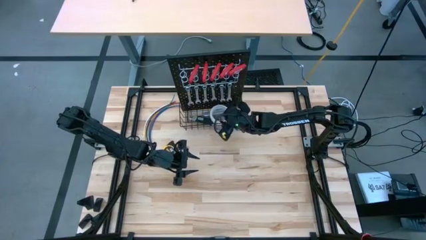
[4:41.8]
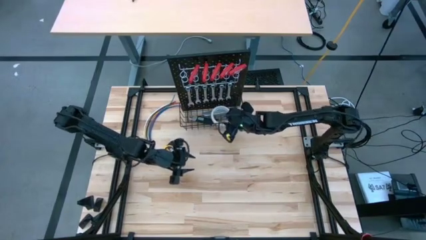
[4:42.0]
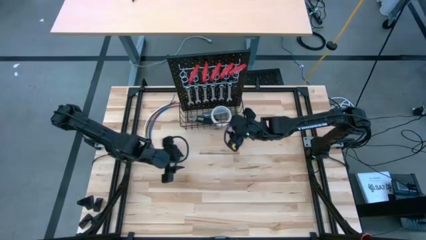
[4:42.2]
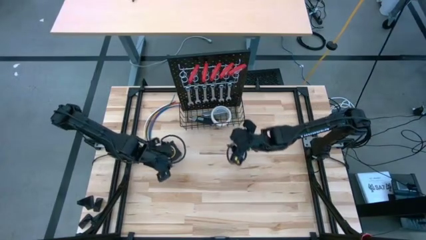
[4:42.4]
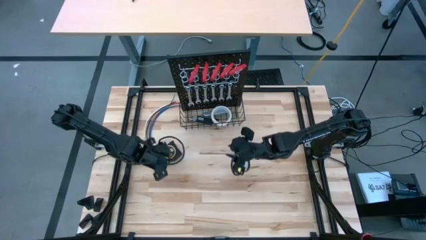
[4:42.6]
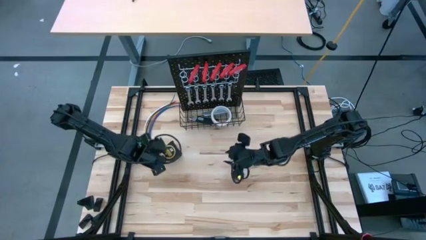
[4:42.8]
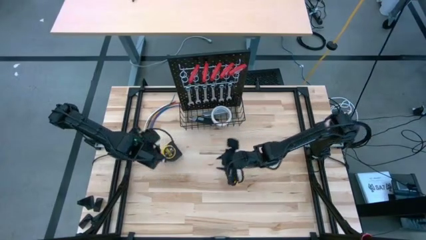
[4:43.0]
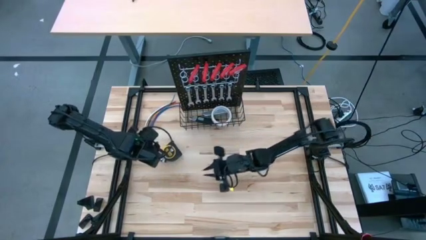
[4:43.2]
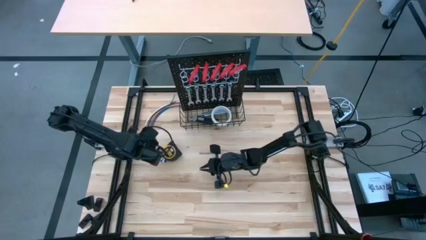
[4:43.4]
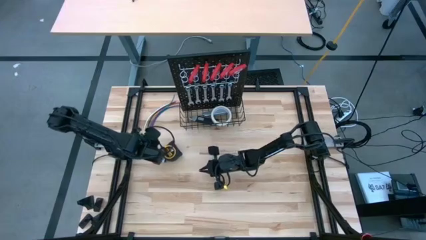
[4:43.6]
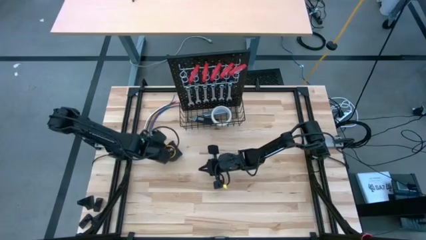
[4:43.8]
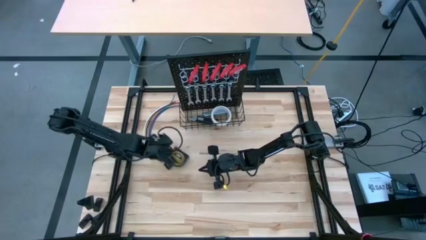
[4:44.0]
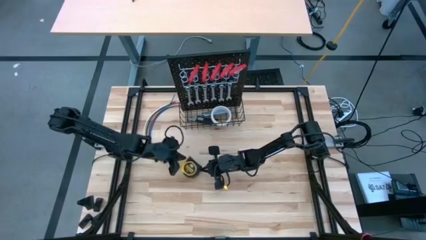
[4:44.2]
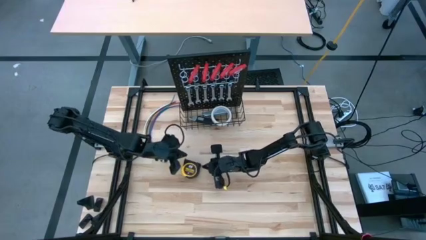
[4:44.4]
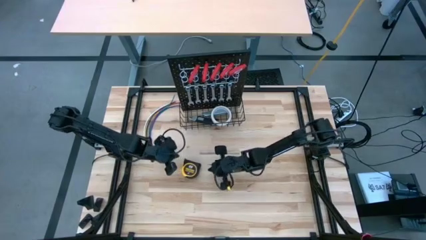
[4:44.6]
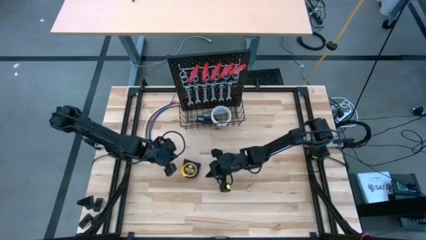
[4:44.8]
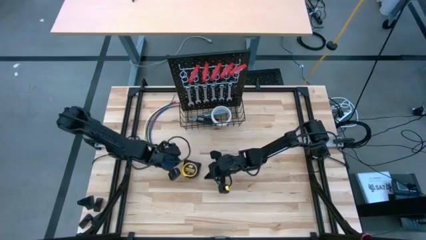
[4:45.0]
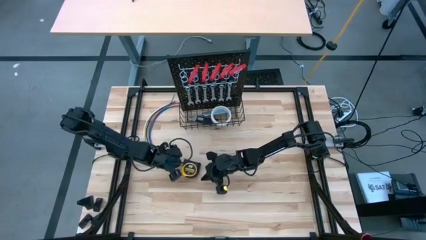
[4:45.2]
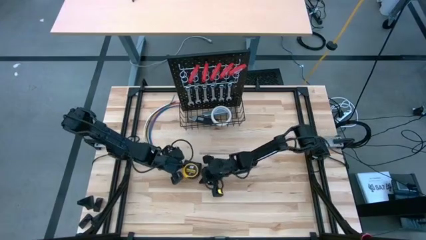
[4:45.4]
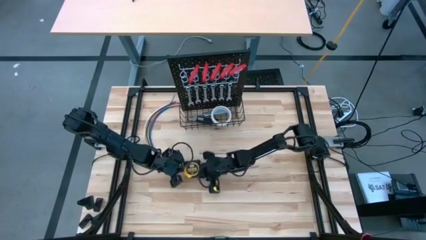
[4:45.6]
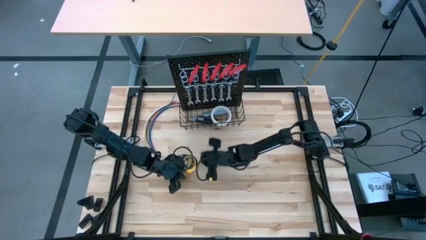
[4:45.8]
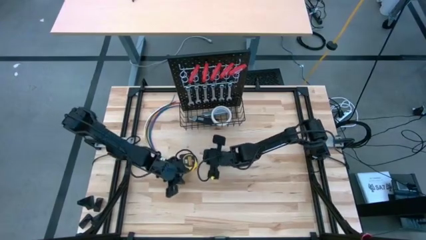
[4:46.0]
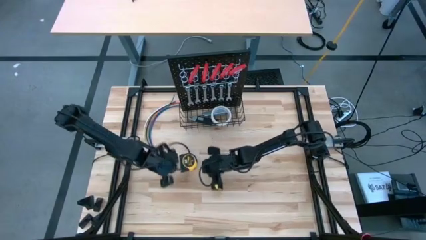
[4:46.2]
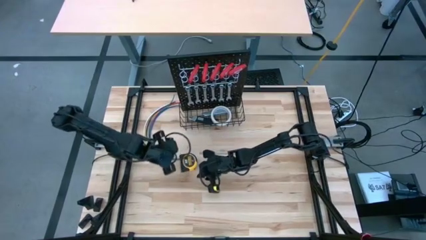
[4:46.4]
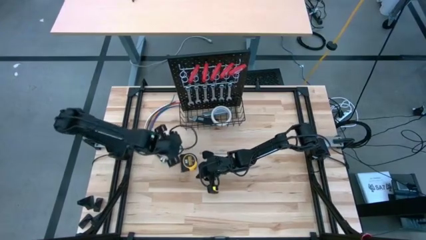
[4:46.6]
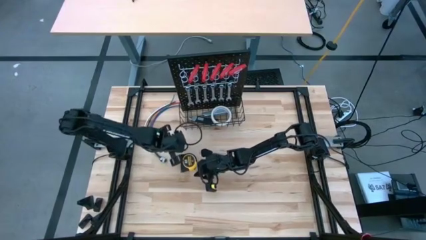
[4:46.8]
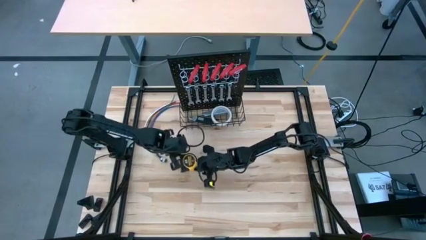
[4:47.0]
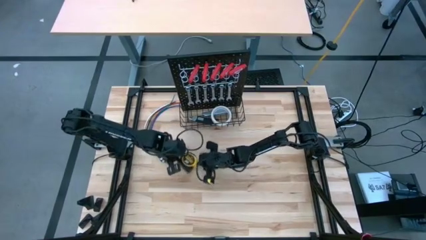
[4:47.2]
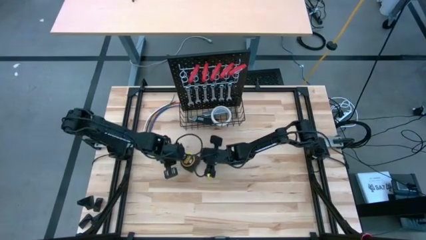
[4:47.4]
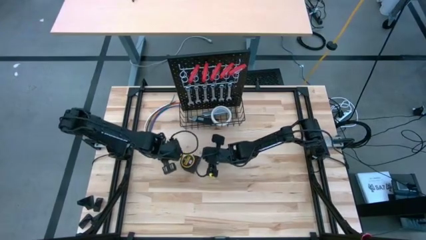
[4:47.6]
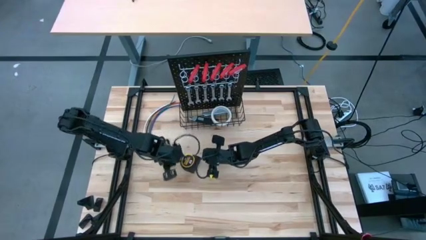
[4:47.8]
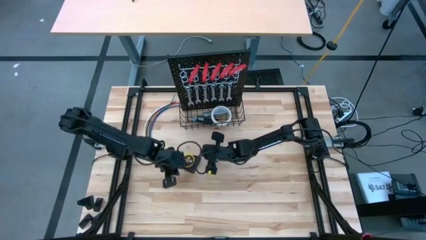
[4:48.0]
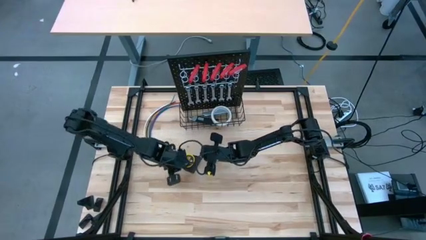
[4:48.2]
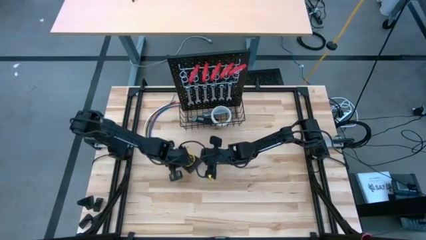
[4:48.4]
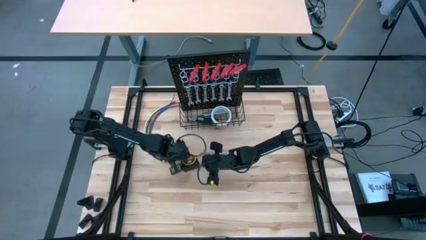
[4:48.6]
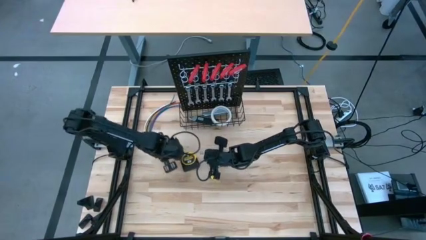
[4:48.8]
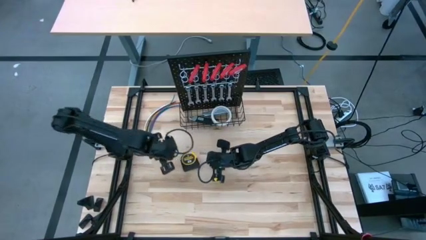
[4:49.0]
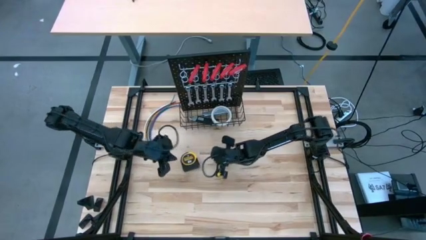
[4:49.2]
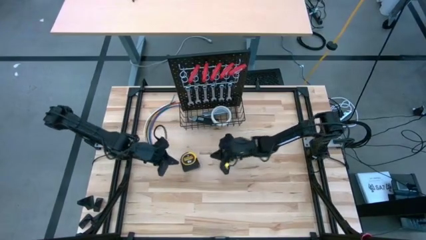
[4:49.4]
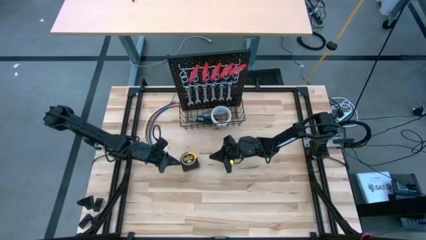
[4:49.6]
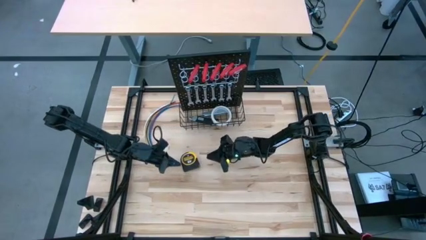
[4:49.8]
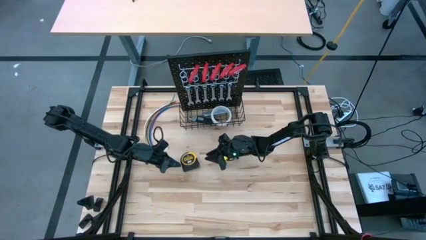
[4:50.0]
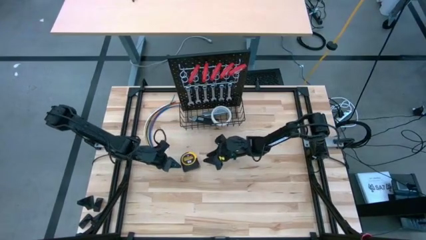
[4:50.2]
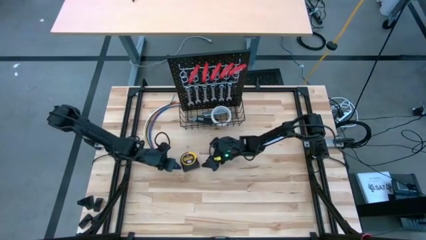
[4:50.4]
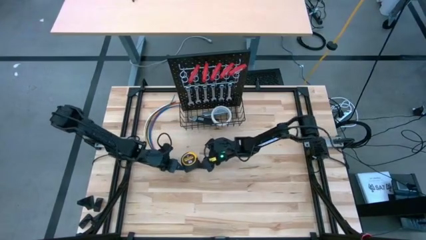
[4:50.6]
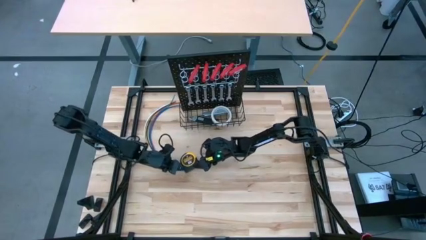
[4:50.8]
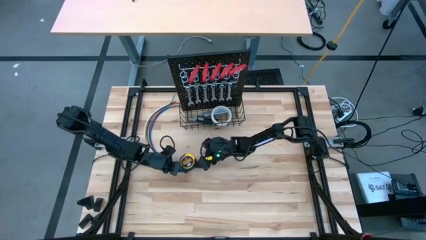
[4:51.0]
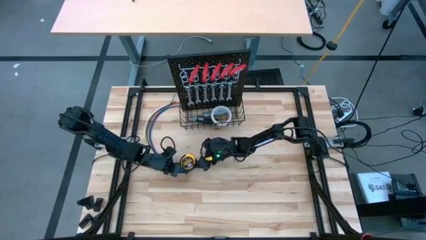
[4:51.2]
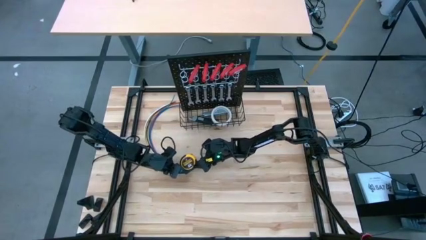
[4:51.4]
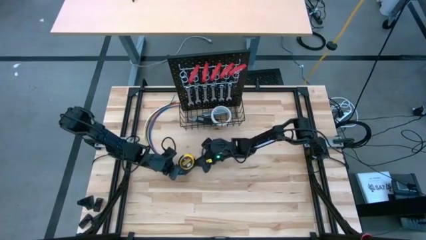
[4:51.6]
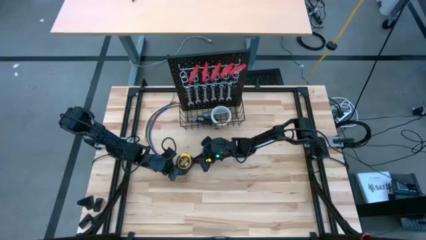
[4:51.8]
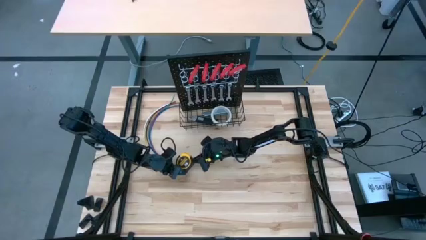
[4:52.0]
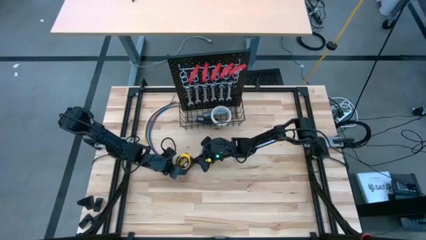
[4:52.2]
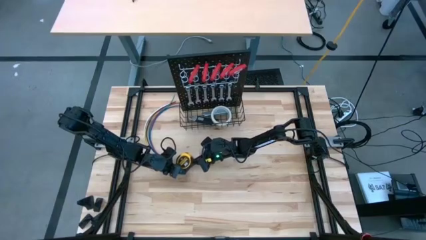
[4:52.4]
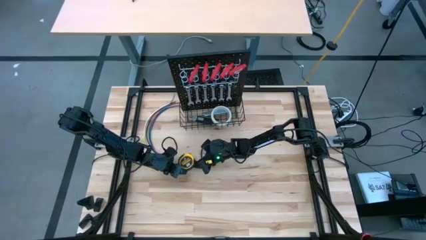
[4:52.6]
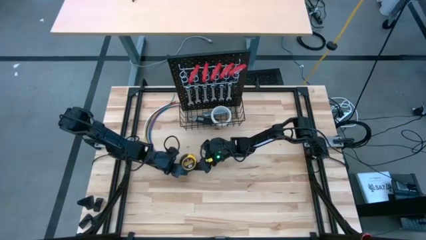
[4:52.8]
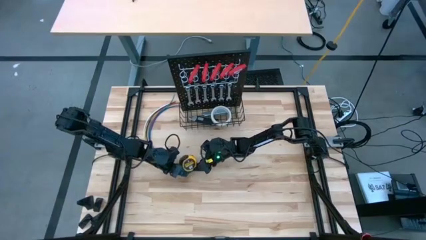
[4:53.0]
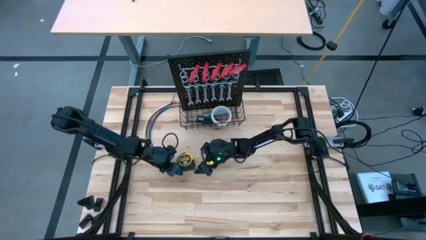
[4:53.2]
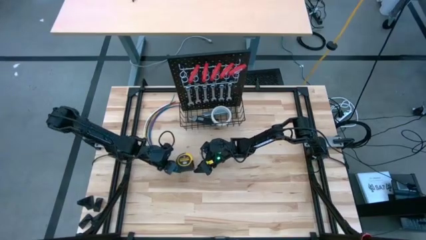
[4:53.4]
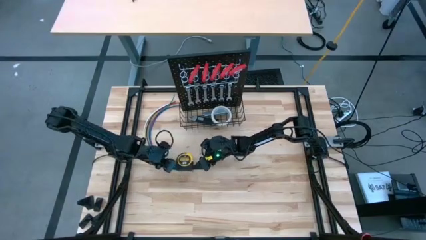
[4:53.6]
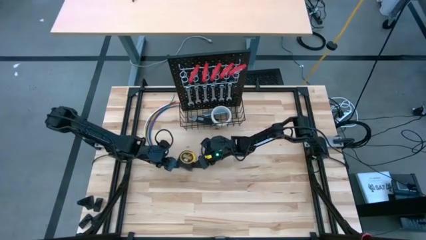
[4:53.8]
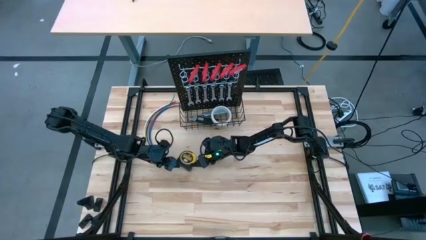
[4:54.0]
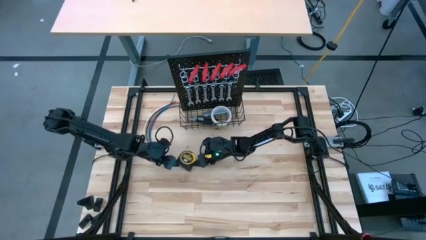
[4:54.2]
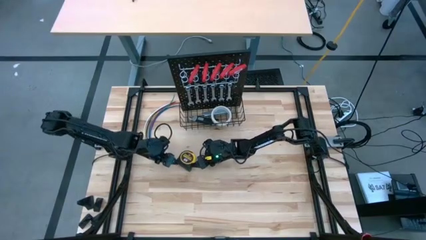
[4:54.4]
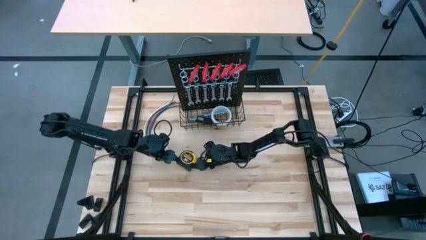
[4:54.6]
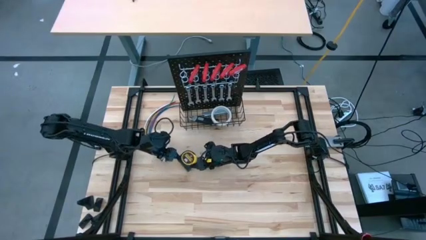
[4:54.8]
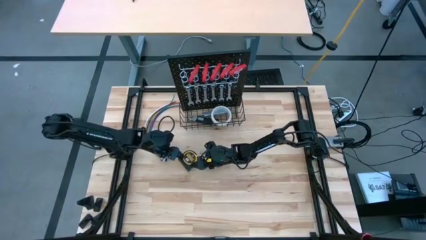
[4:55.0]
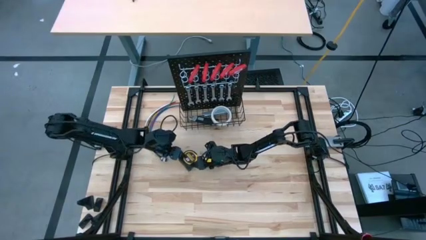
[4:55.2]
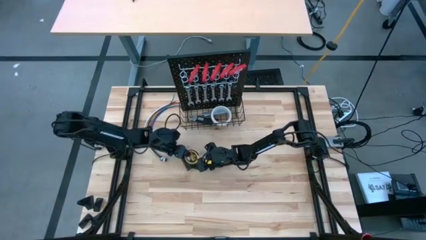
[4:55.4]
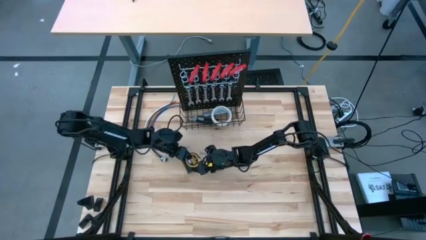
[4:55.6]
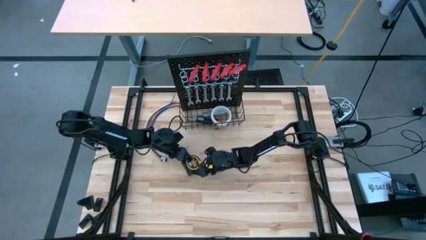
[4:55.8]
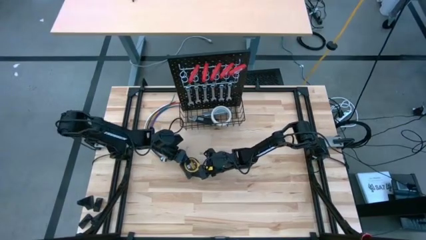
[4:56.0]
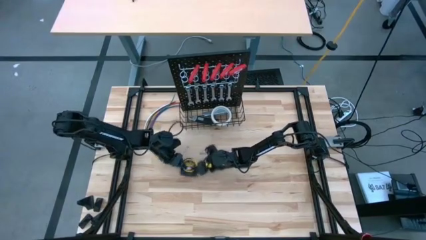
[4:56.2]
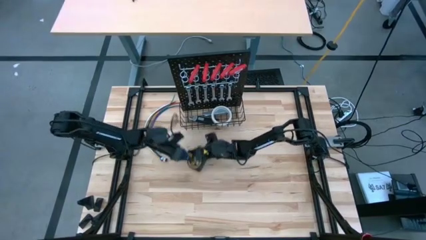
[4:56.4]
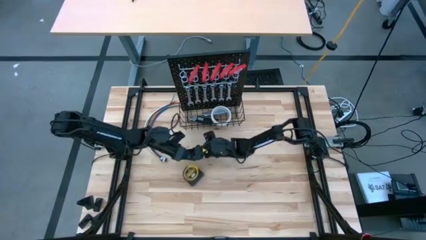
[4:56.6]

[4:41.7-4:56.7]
Task: Hang tools onto peg board
Hang the measuring tape on the peg board

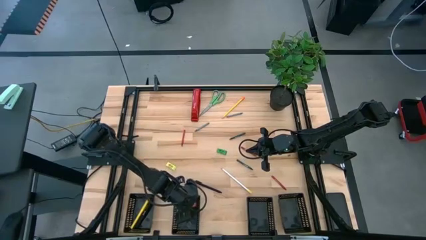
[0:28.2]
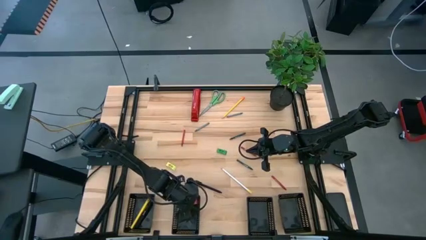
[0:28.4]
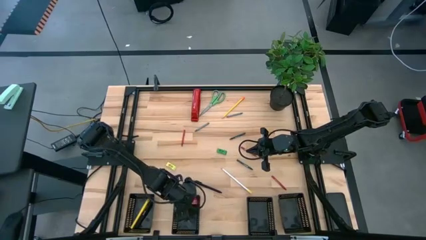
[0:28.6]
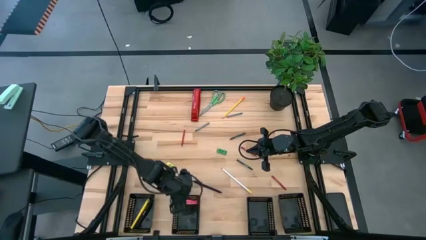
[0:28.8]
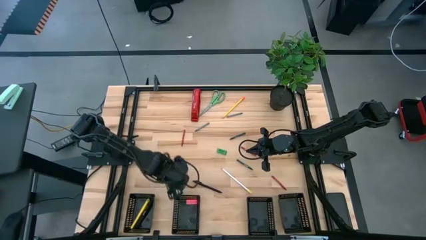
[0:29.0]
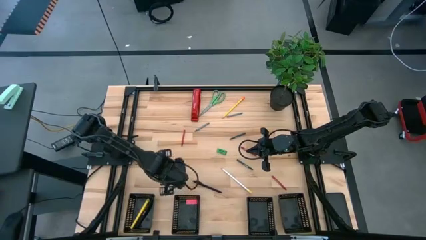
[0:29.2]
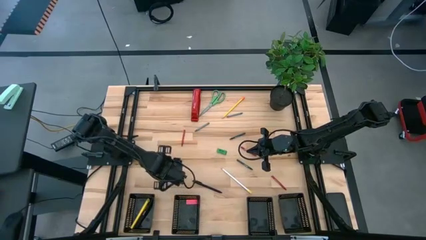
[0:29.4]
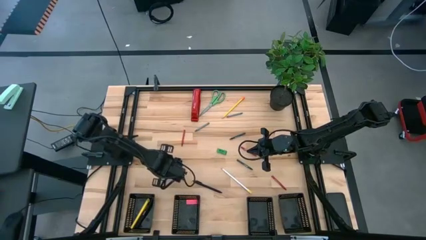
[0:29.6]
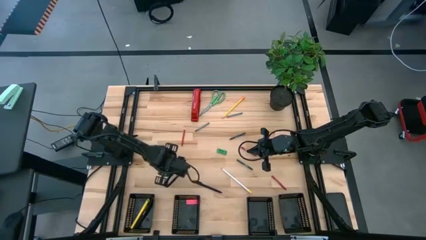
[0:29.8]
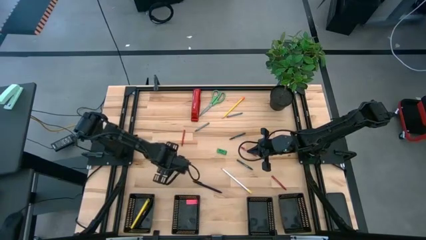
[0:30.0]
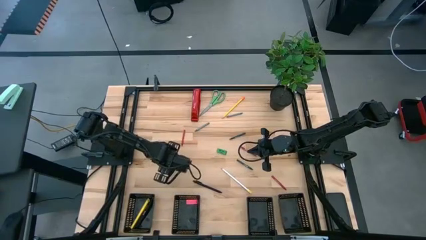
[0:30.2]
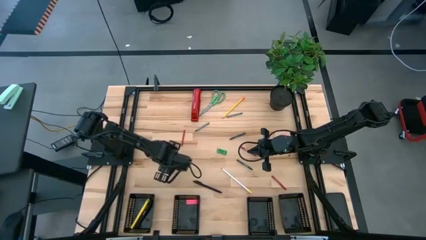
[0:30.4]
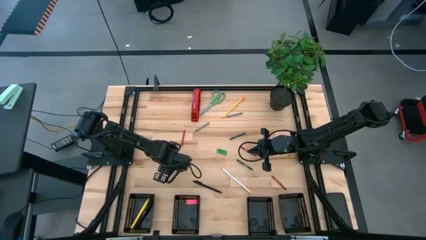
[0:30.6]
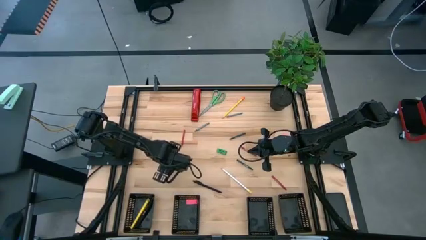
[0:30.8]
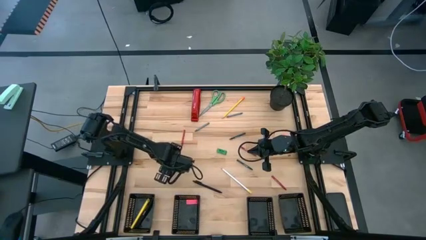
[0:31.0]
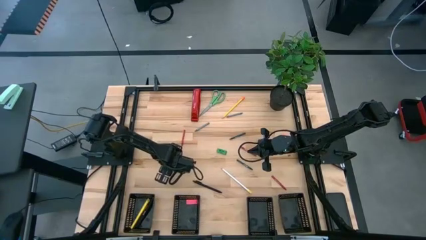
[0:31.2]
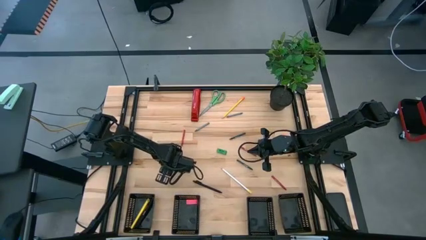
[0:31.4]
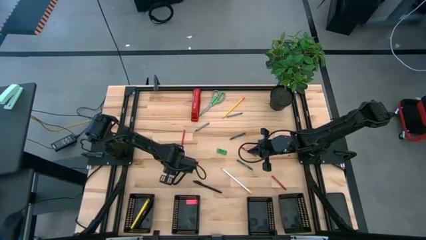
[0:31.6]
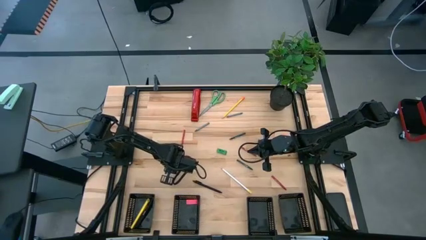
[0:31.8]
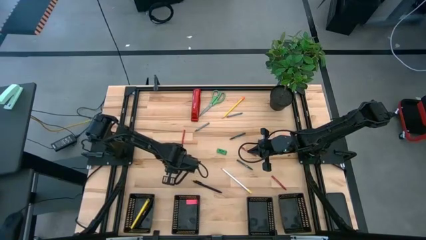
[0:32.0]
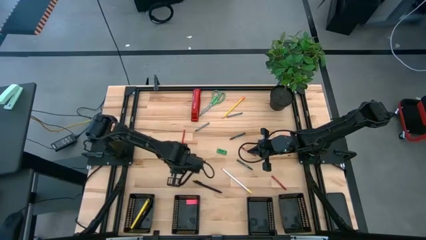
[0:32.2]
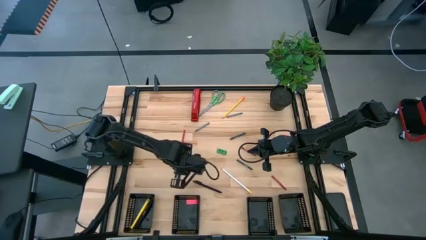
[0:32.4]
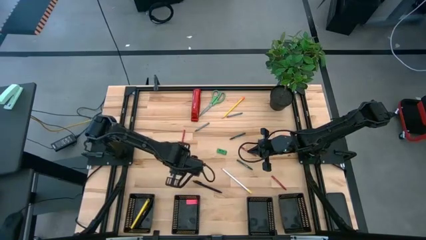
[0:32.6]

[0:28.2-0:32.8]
Task: Sort crayons/erasers/pens/pencils in bins
Put the yellow eraser into the middle left black bin
